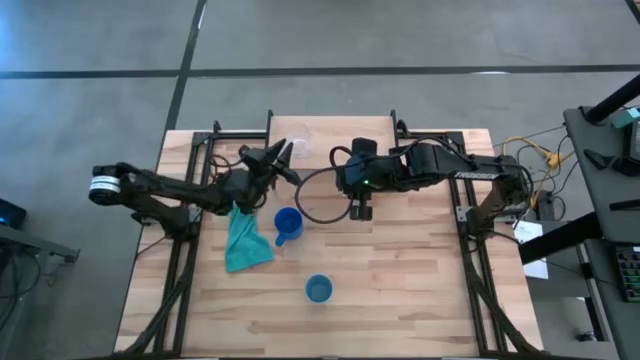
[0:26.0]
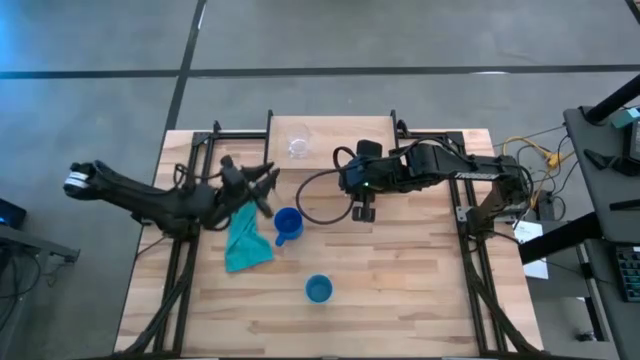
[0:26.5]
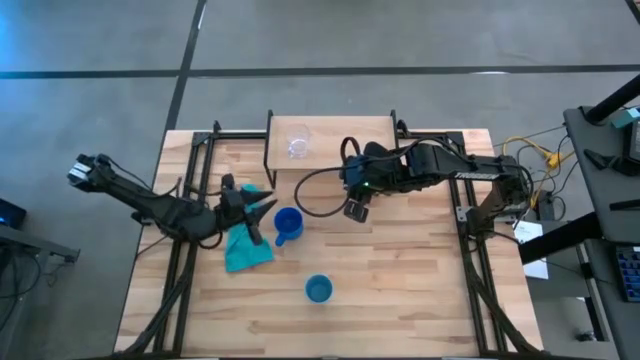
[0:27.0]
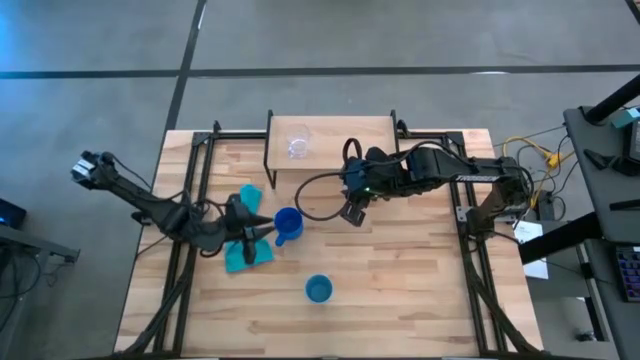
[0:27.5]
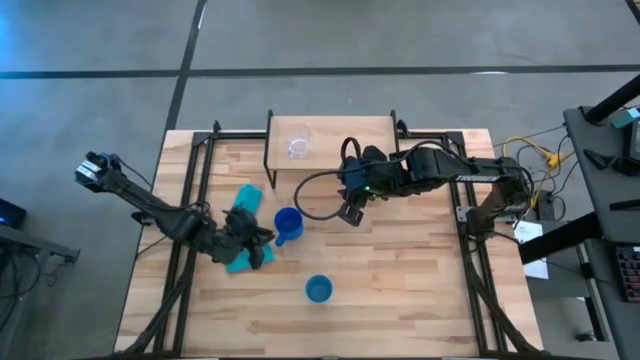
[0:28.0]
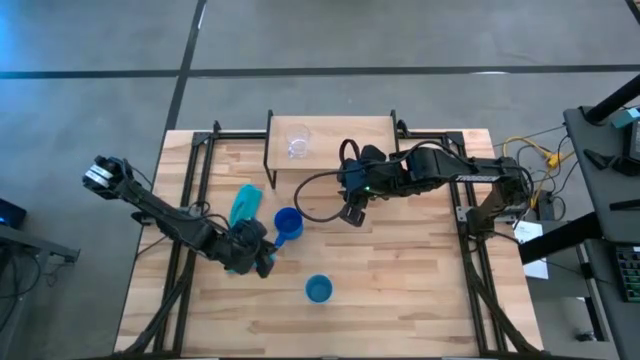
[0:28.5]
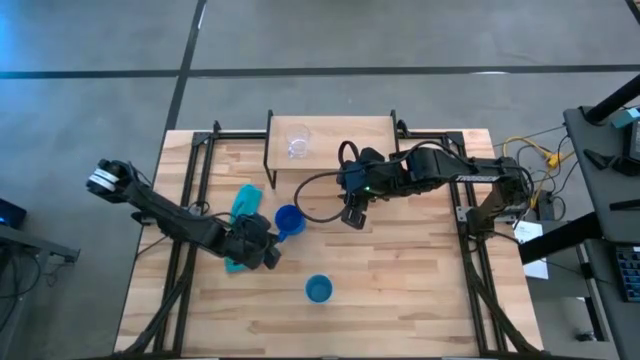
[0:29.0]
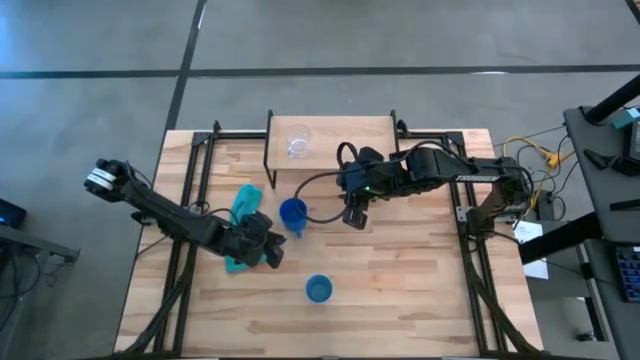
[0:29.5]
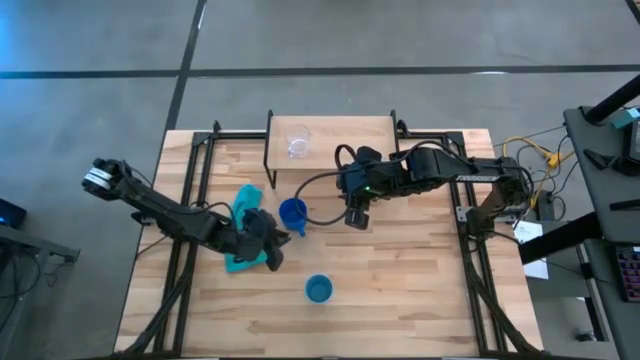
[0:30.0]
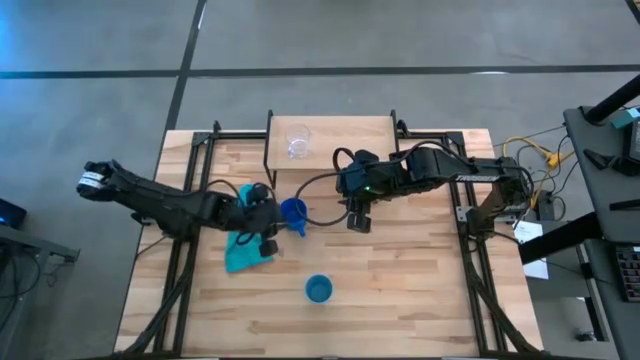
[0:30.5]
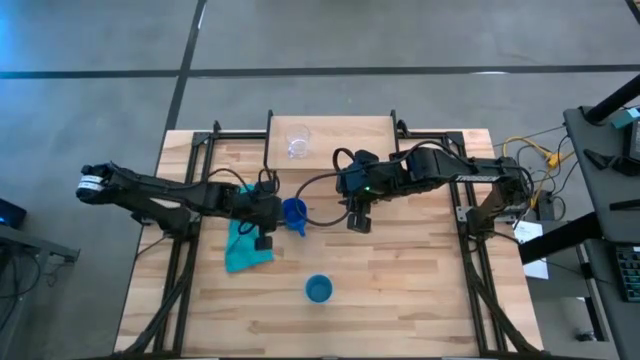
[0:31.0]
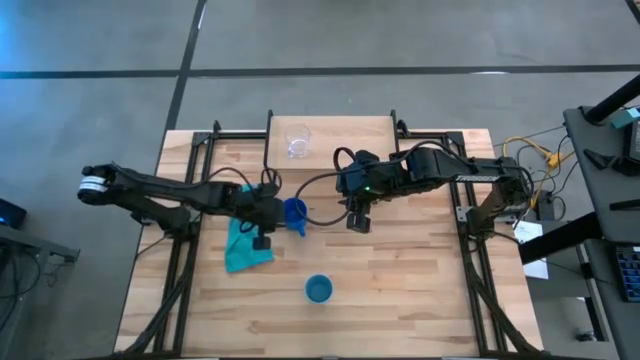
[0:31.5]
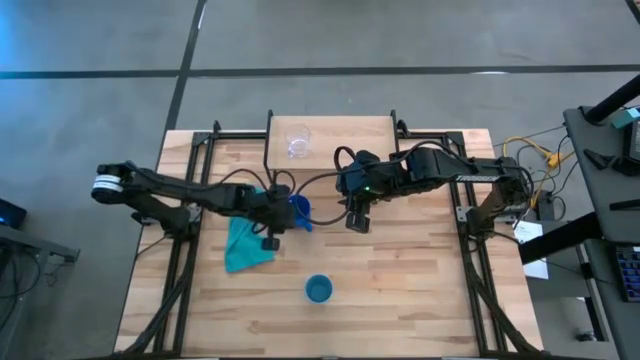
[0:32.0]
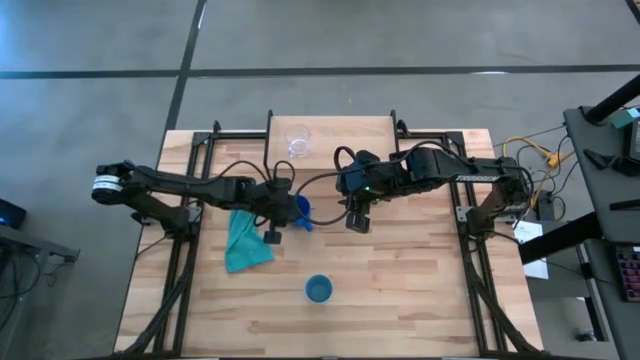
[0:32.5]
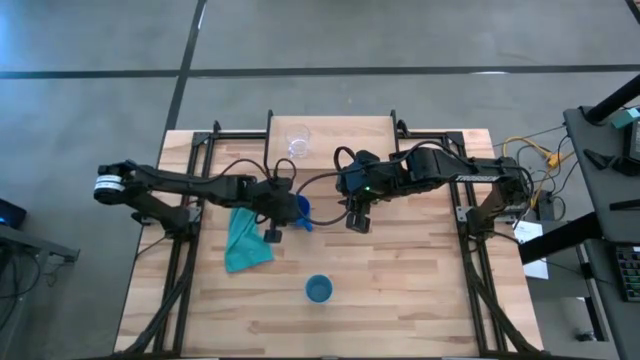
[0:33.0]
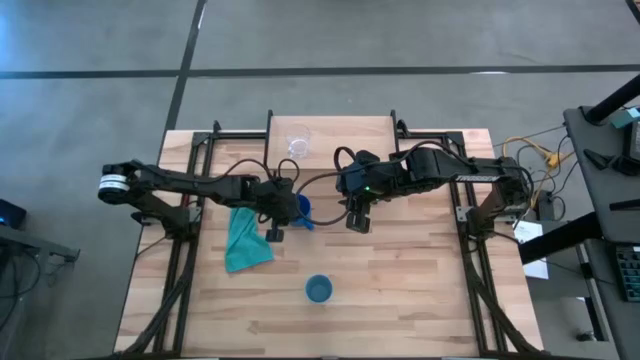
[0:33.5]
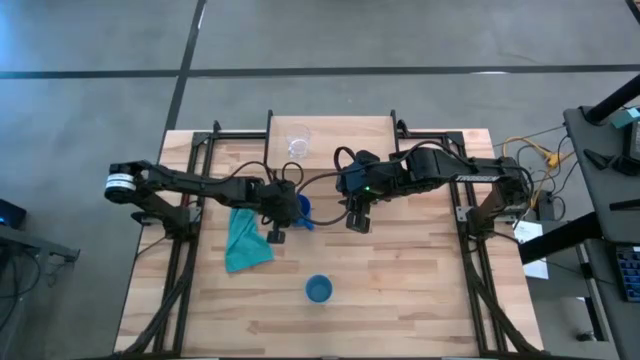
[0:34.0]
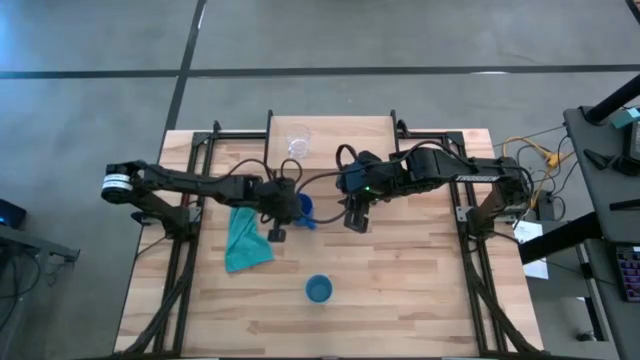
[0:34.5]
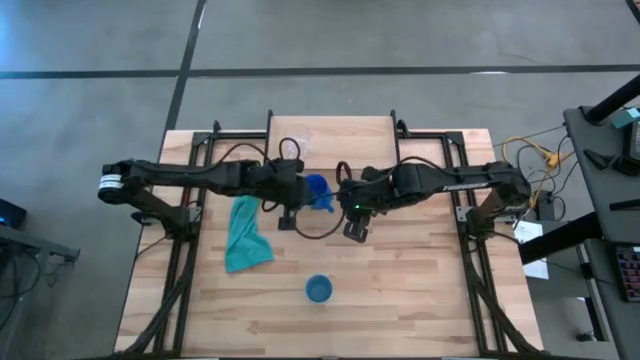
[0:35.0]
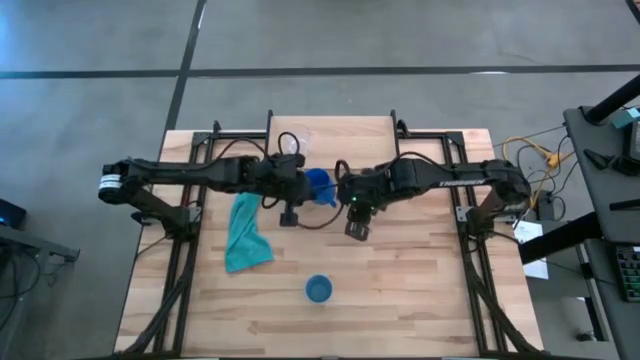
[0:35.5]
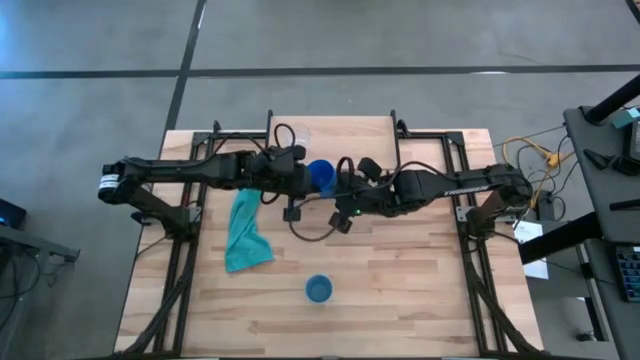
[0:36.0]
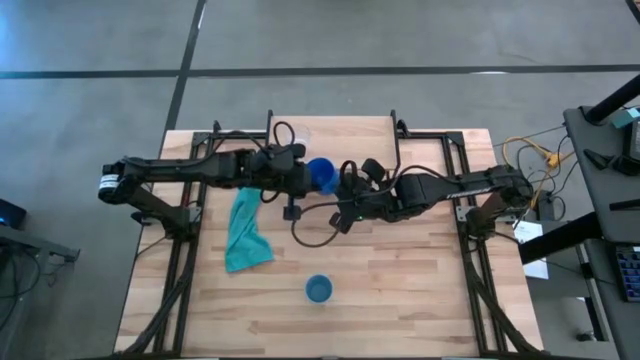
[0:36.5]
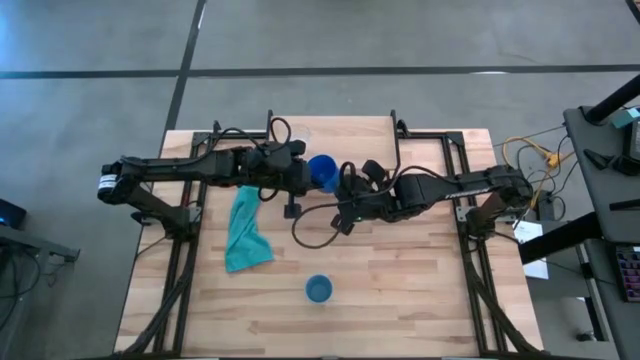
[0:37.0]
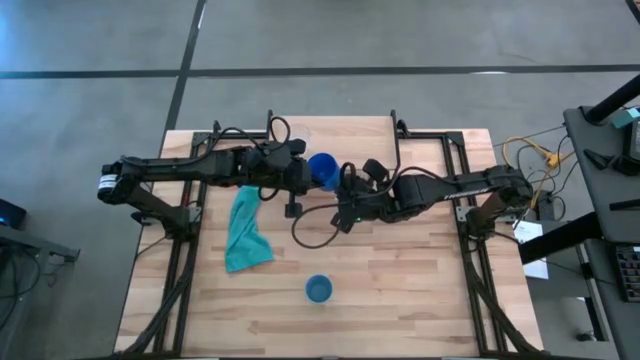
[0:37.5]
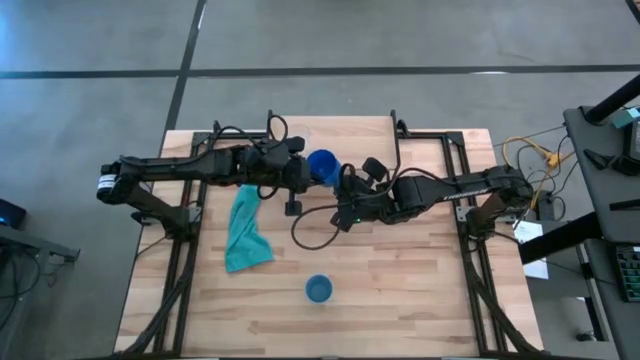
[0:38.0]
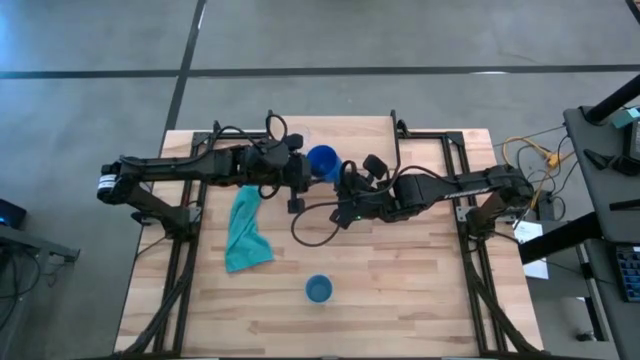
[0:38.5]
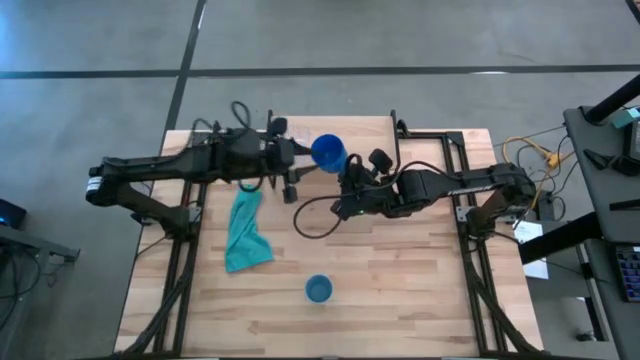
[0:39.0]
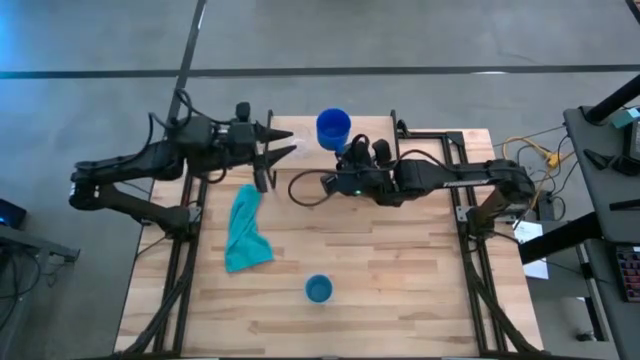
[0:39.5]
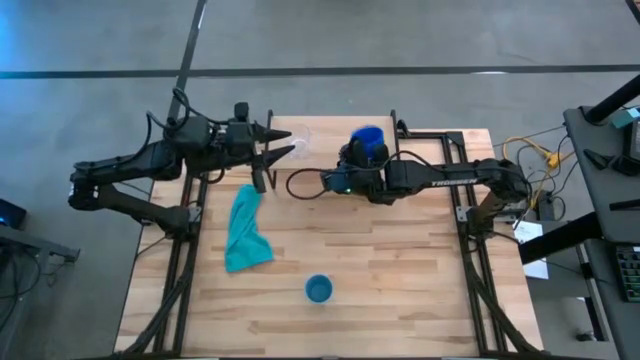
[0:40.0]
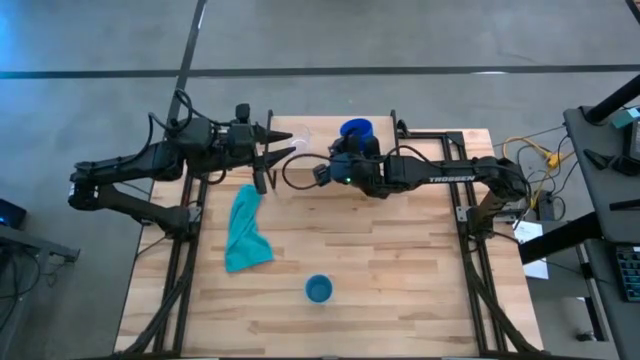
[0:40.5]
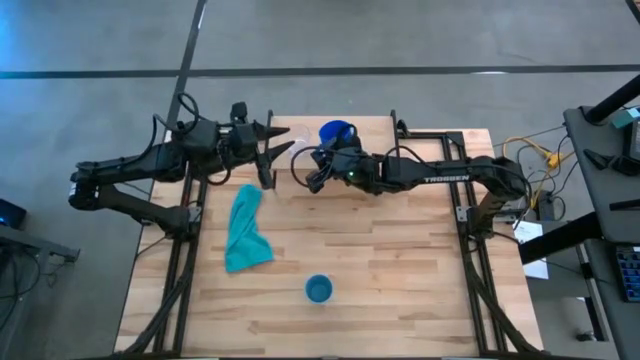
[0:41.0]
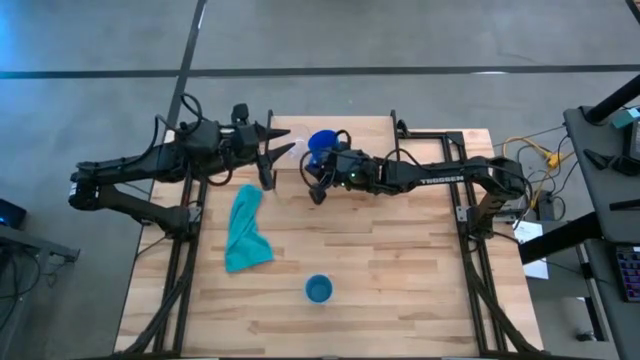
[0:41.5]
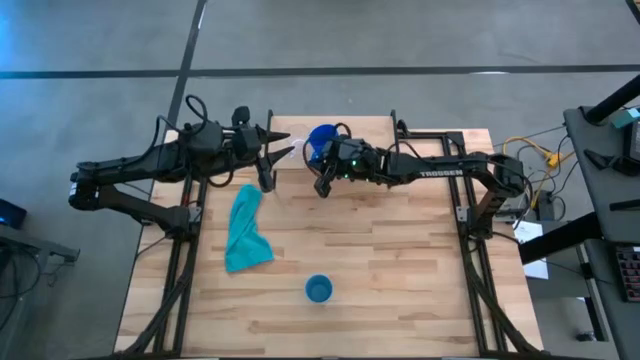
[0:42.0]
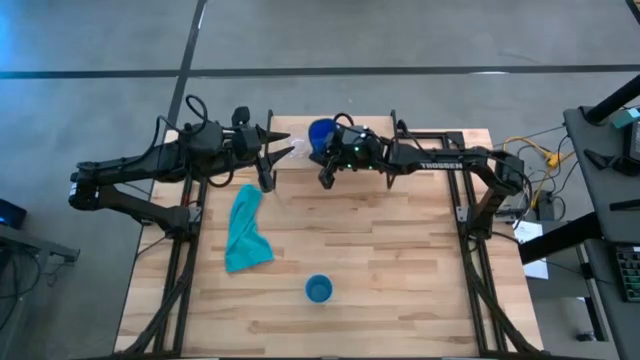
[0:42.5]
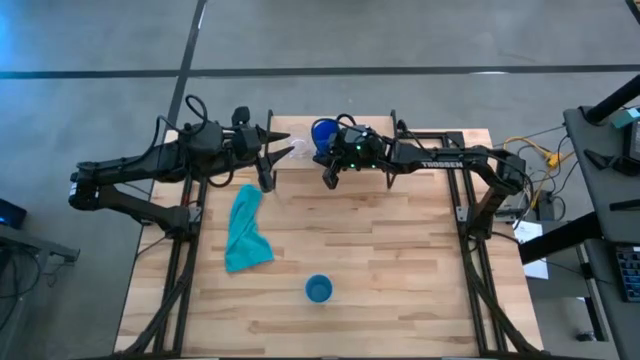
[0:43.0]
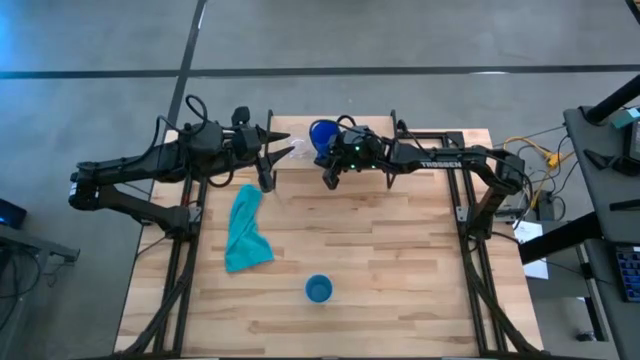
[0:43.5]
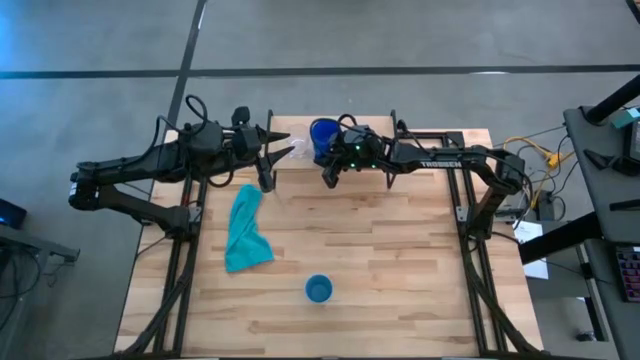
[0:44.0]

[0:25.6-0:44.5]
Task: Stack small to large cups/mugs on shelf
Put the blue mug on the shelf

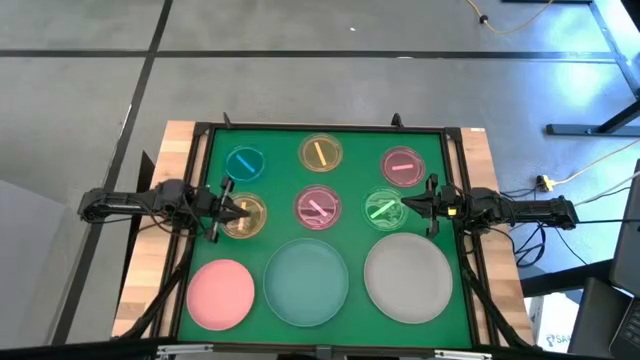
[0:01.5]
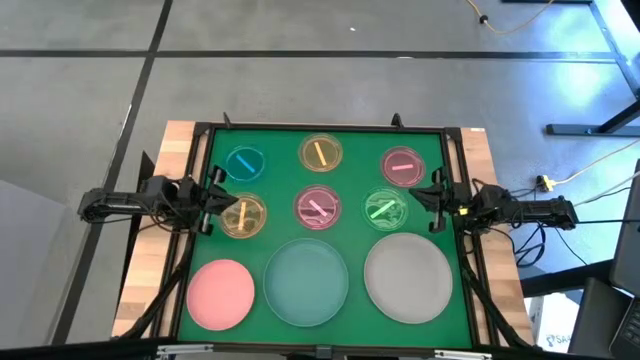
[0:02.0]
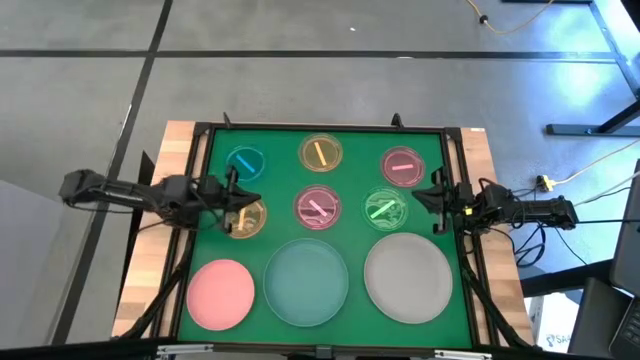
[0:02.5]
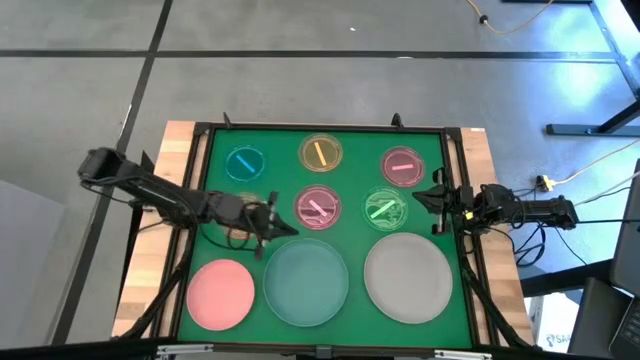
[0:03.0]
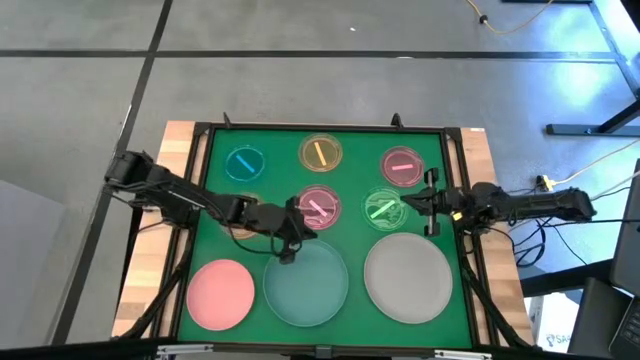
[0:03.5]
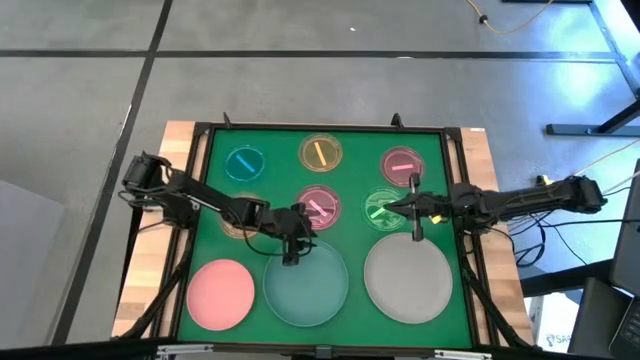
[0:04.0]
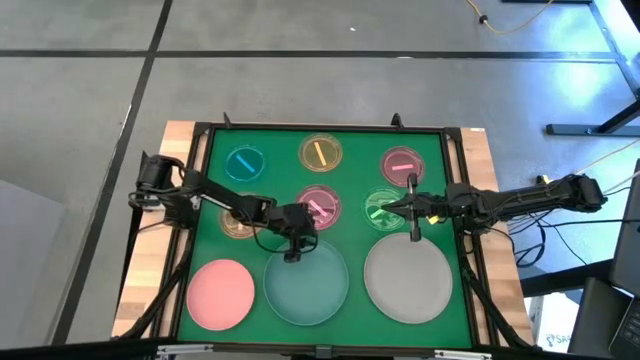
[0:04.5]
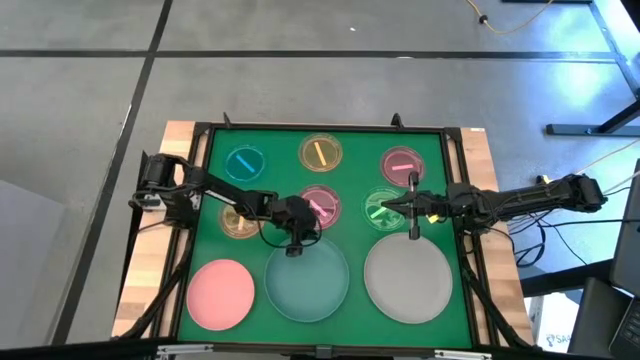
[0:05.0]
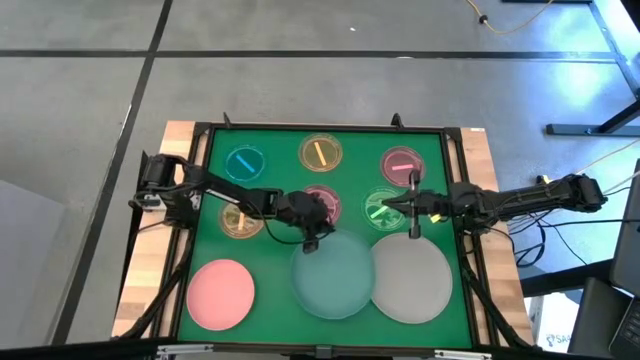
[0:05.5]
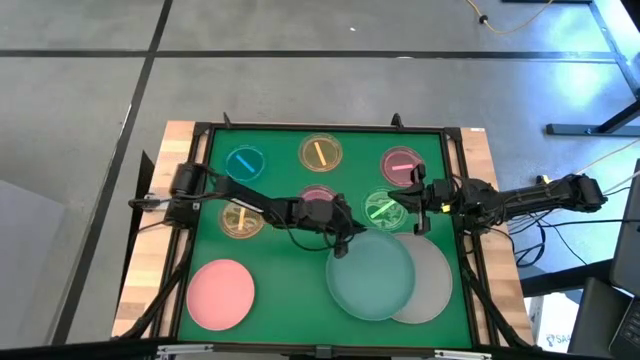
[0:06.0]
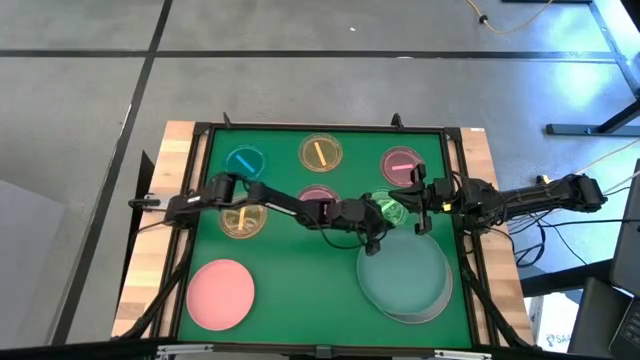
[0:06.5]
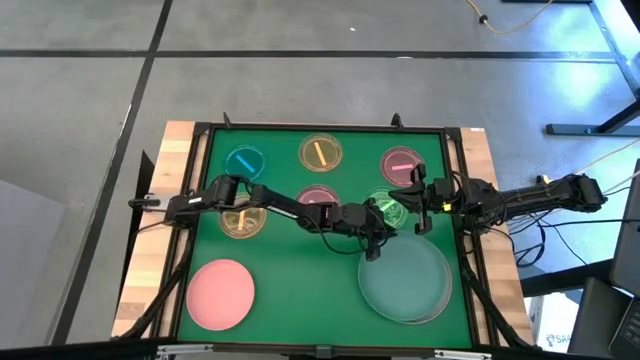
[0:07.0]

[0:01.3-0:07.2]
Task: Stack plastic plates
Stack the light blue plate on top of the gray plate
